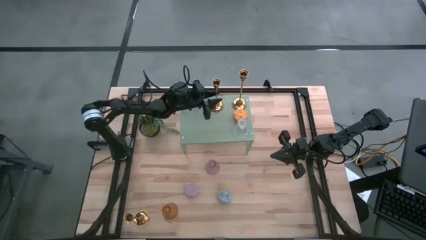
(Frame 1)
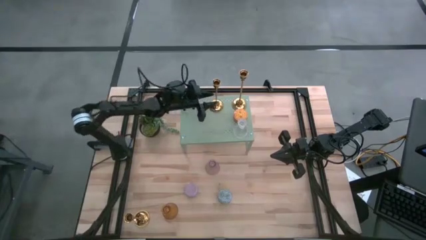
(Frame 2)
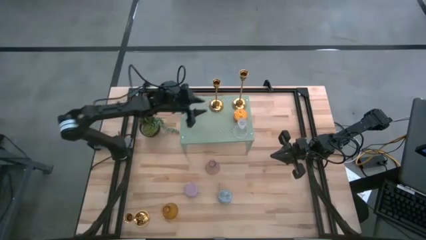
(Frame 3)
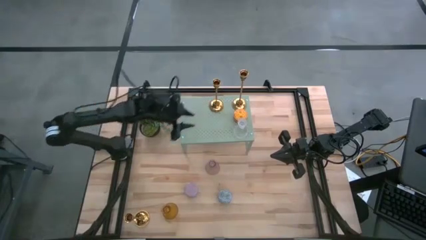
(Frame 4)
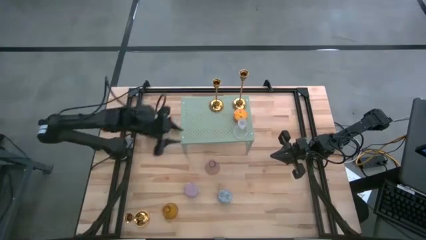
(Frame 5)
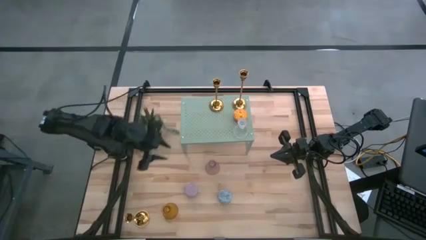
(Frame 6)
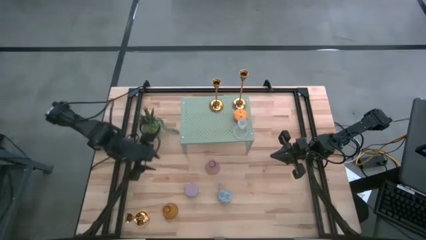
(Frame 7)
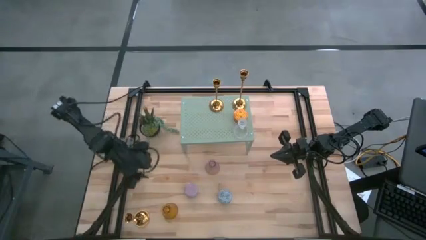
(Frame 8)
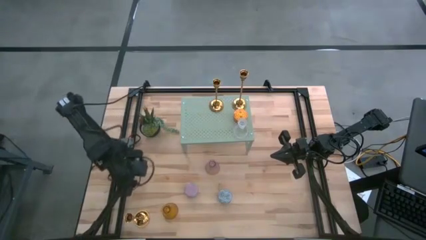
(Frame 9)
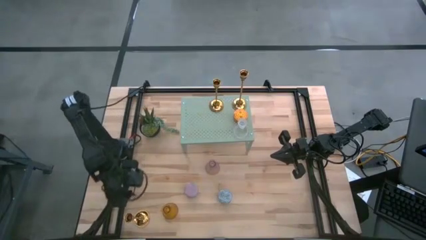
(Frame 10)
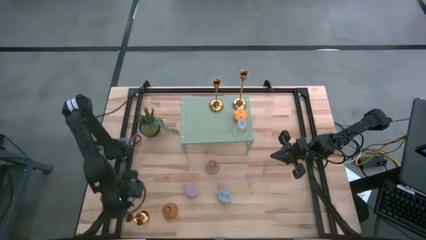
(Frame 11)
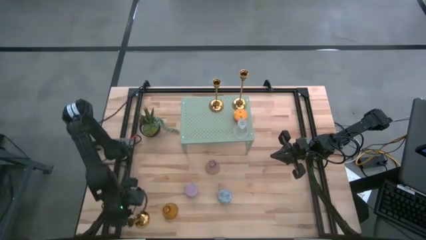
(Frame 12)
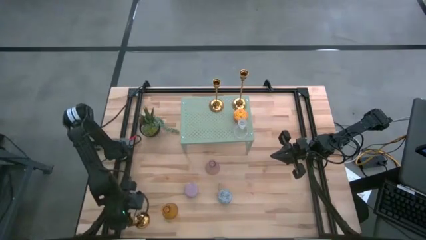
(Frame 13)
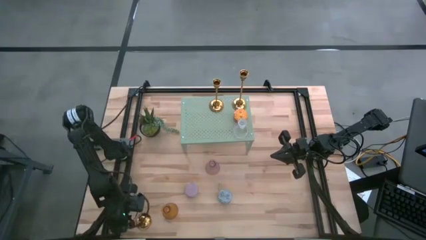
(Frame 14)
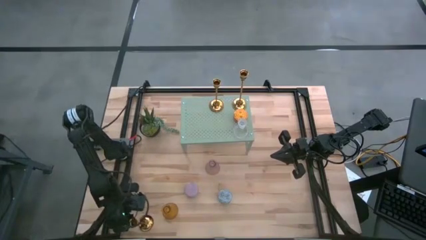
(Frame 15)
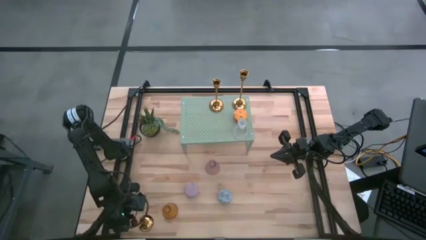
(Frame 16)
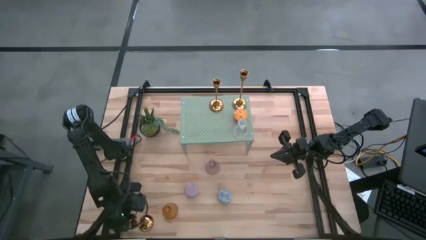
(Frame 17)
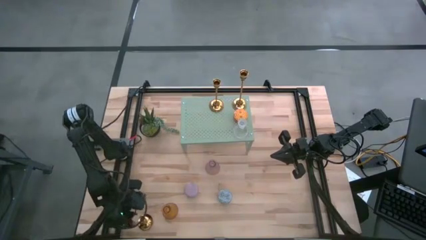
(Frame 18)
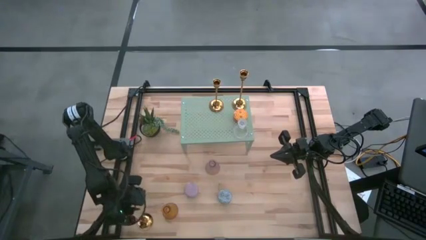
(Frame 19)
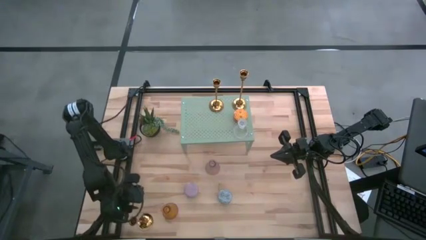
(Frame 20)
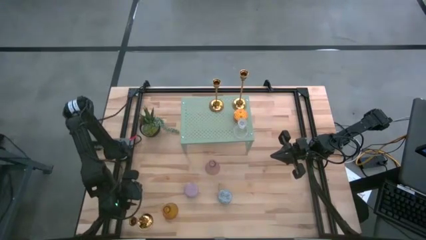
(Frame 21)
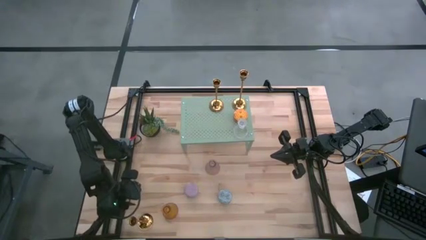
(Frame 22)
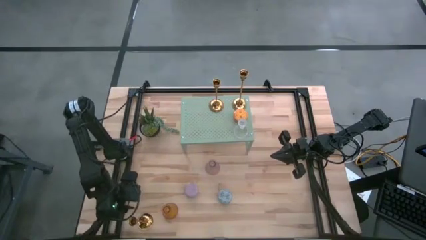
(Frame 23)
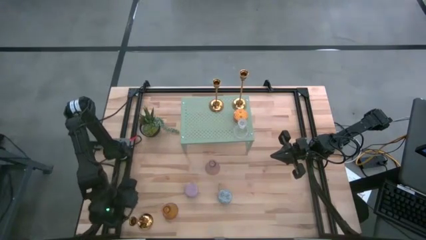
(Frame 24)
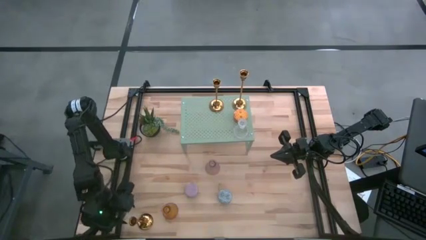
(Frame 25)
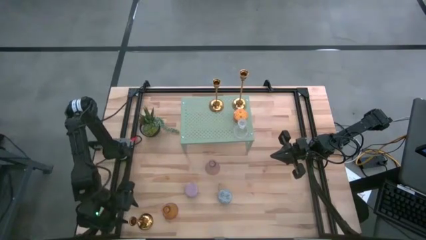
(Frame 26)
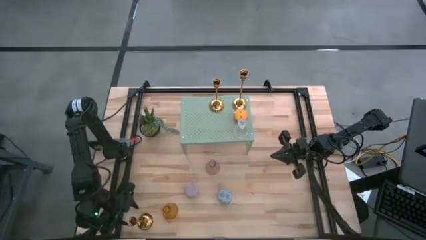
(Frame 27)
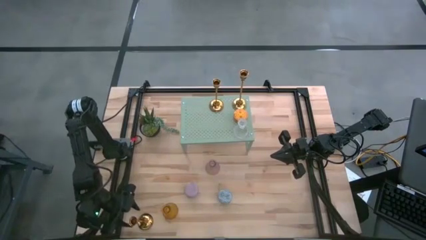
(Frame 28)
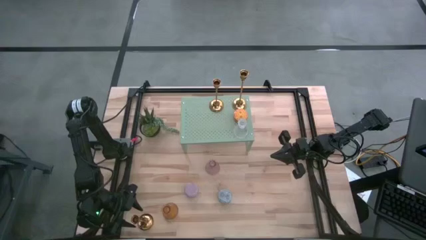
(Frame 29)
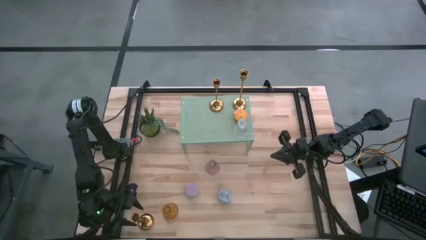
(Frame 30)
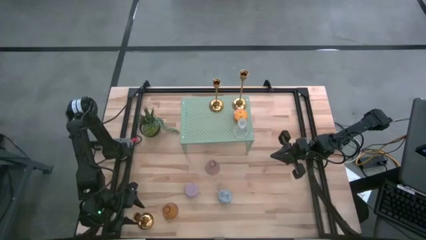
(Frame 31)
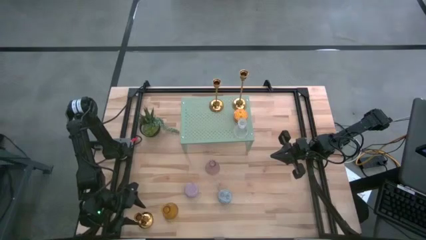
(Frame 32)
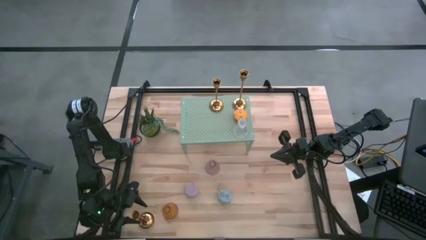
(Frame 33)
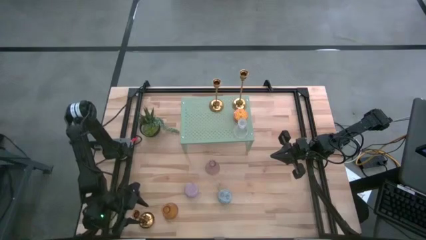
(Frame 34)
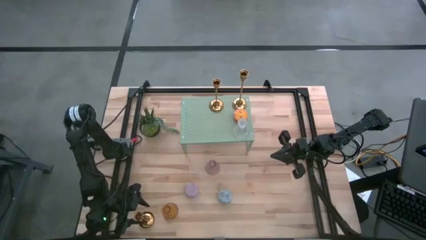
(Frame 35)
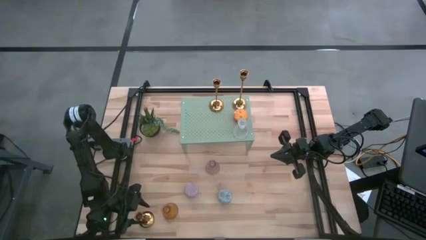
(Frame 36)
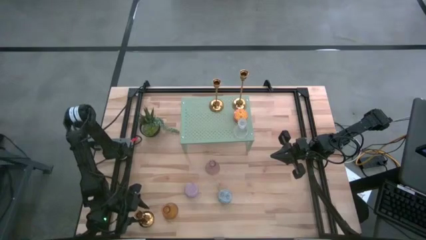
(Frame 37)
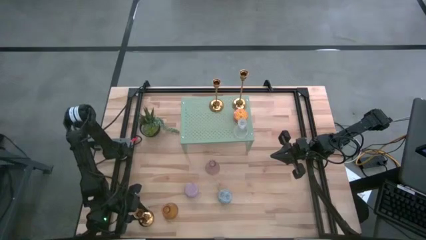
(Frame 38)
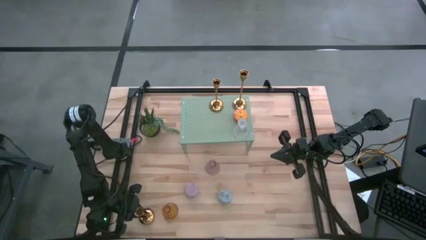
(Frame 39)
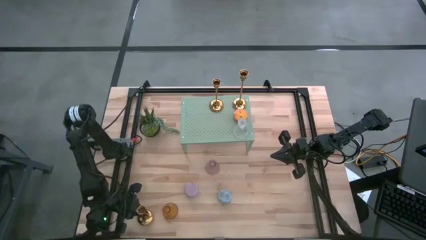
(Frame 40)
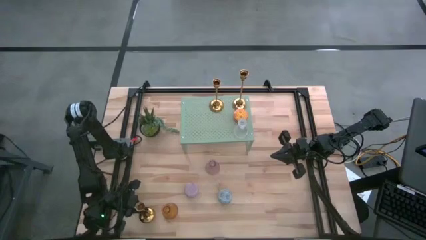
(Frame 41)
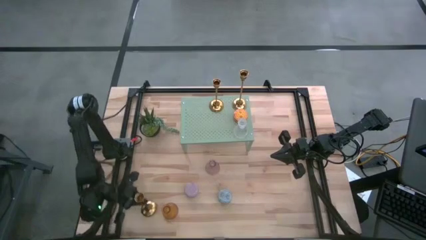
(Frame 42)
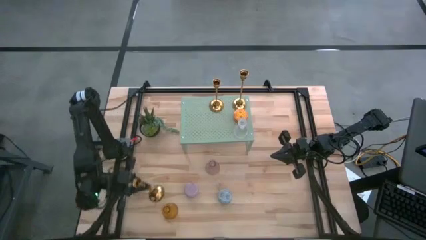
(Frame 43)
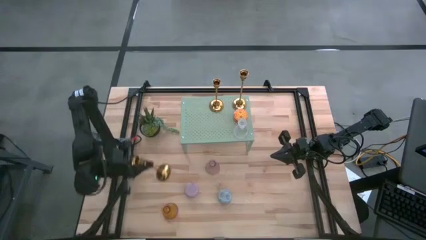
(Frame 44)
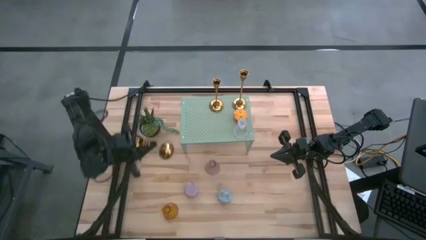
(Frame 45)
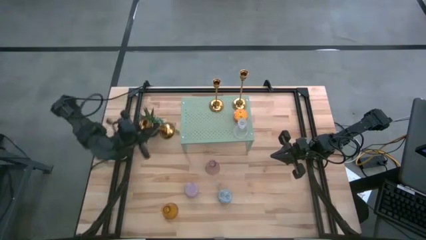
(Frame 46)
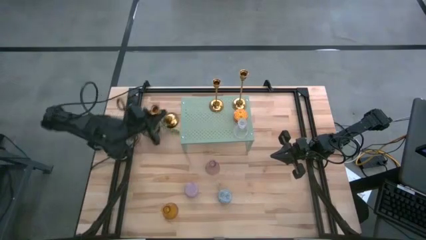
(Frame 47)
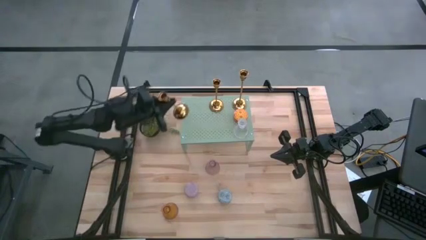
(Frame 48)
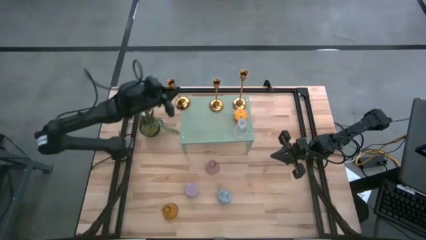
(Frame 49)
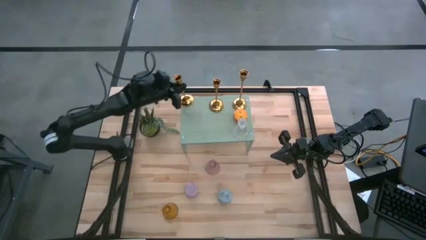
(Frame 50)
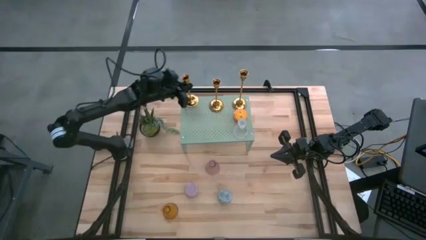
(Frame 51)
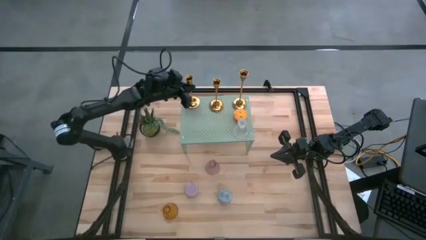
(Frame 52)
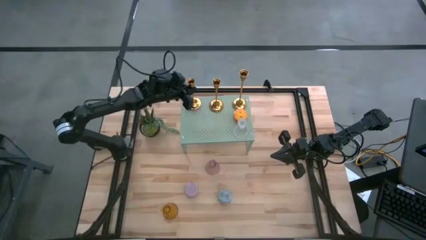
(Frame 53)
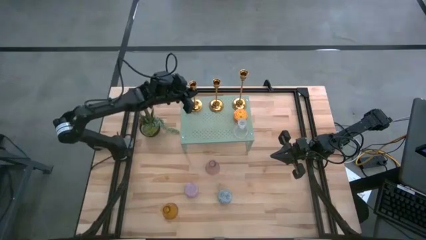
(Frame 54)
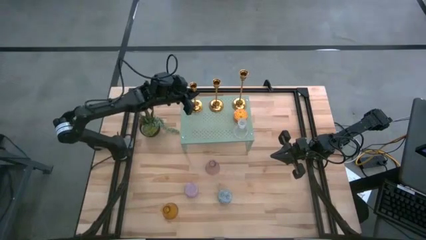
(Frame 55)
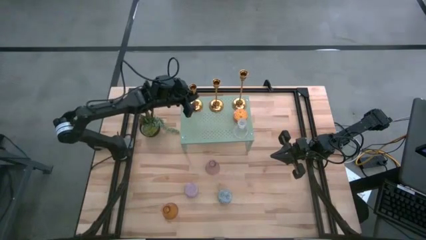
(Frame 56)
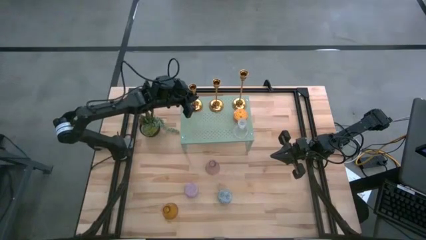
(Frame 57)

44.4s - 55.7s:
Task: Pick & Place candle stick holders
Put the gold candle holder on the shelf

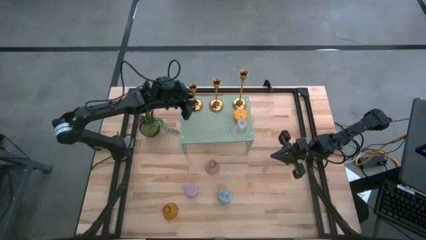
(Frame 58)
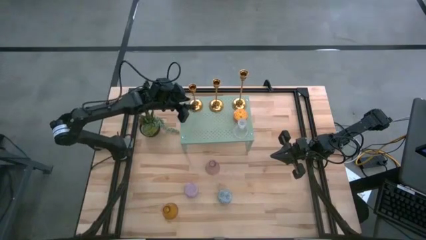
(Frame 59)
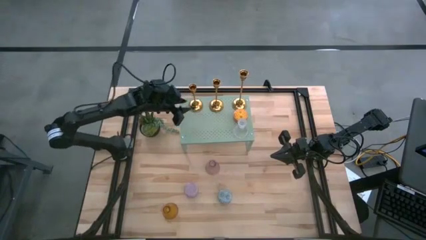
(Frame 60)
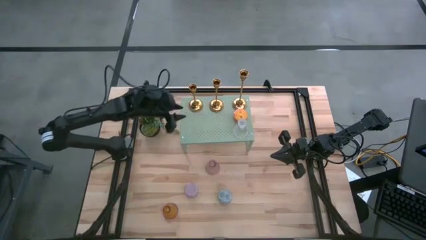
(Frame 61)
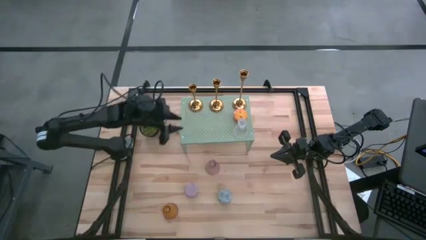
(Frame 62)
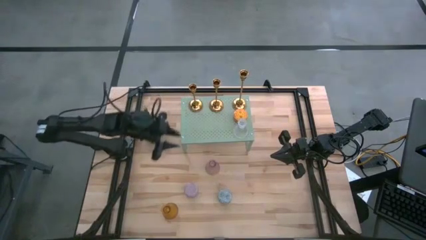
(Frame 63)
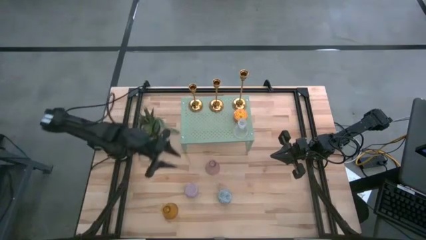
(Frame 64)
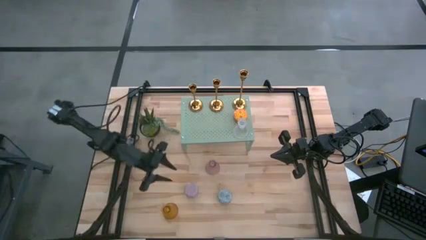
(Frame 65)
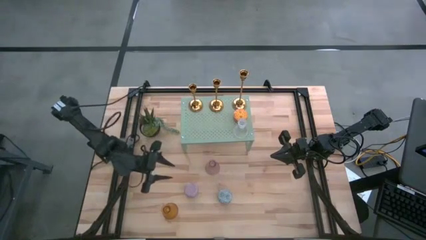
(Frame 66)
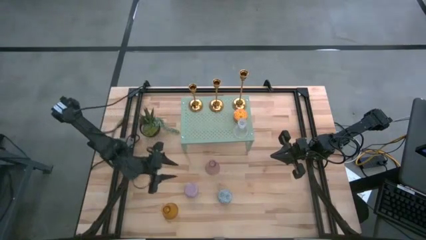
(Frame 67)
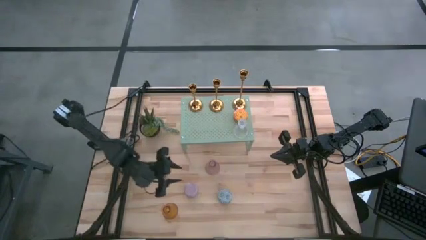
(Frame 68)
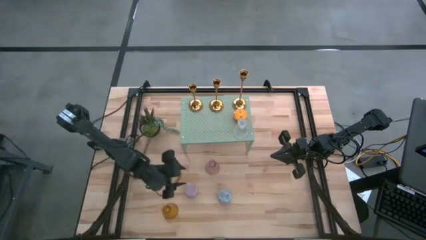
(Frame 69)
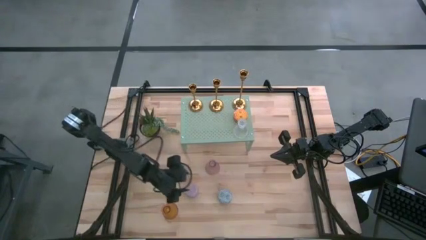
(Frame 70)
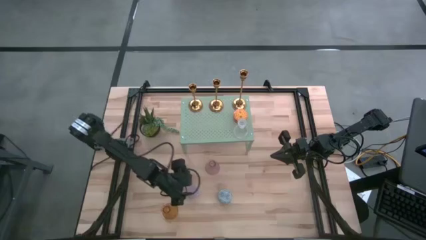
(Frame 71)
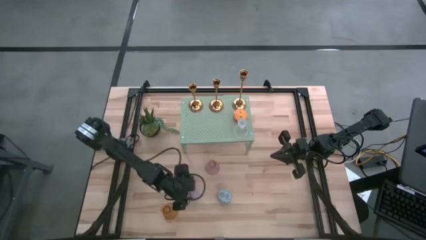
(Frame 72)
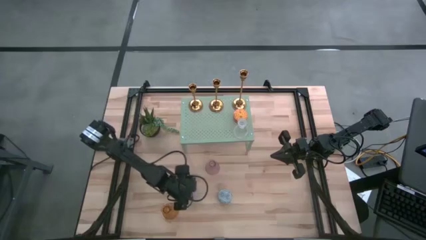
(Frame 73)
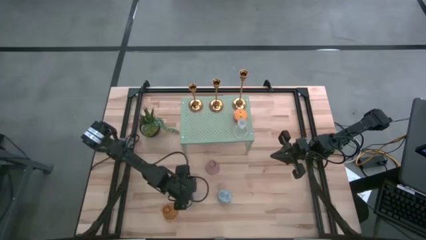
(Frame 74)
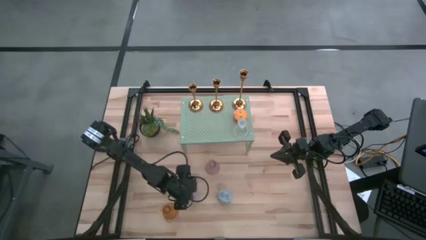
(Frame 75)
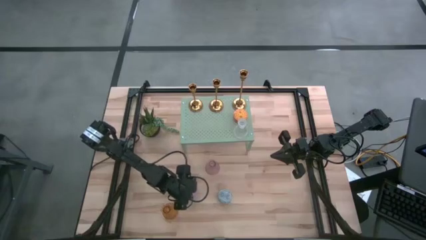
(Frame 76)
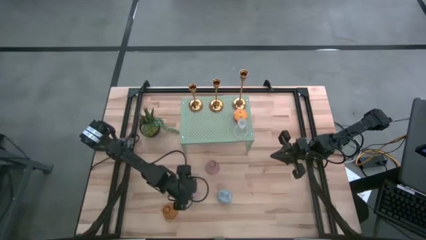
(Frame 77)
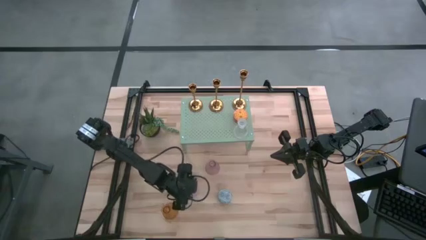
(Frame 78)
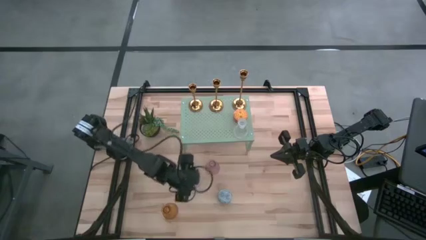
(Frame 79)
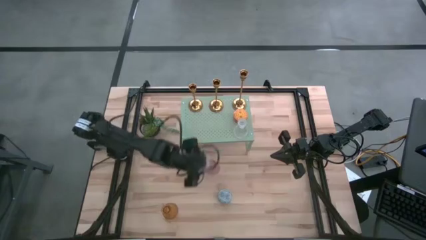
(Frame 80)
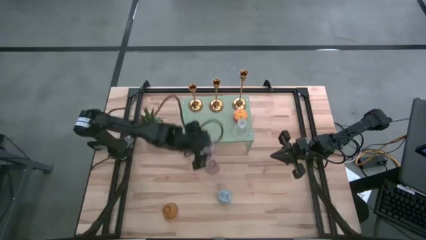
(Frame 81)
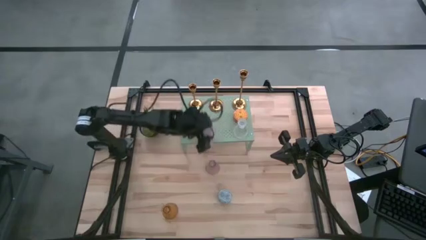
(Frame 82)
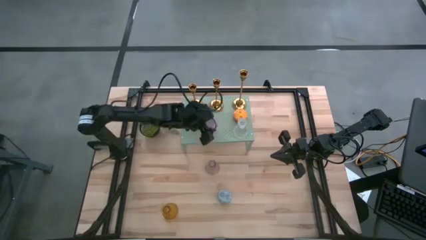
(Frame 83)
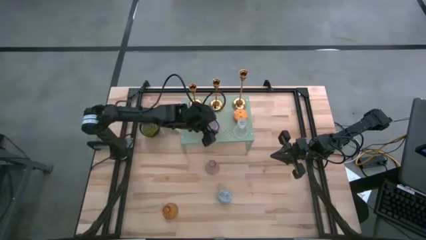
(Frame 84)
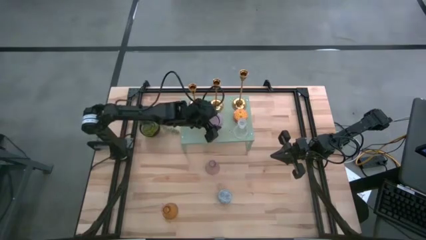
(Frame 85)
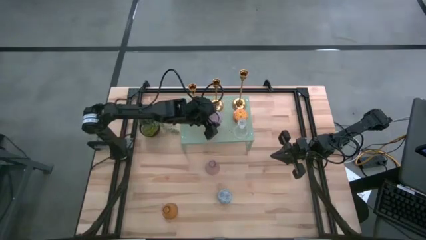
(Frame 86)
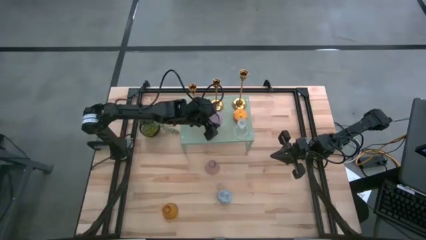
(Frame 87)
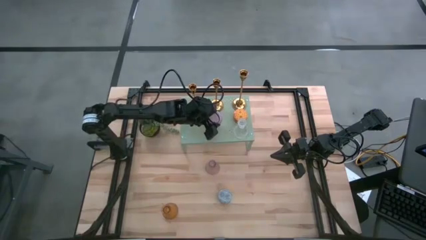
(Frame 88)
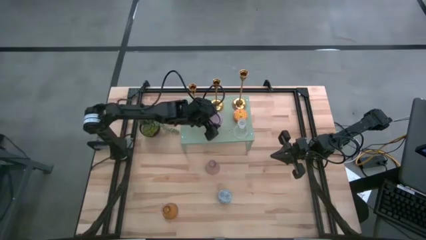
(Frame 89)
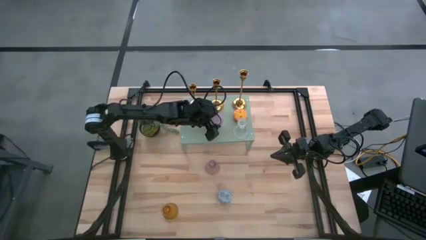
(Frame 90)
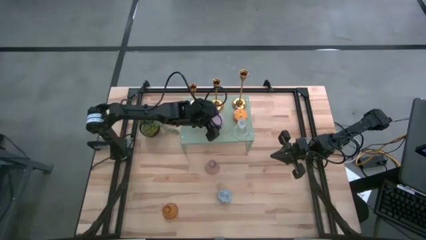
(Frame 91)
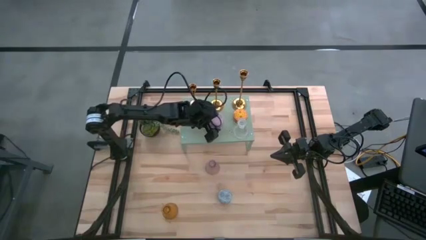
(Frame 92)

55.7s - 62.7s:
Put the purple scented candle on the shelf
